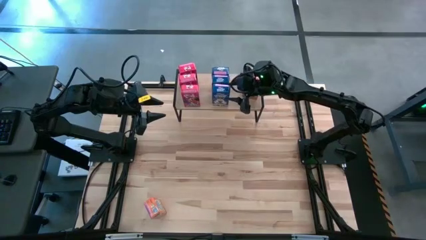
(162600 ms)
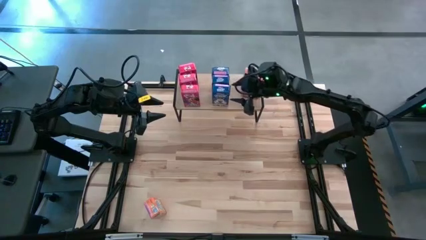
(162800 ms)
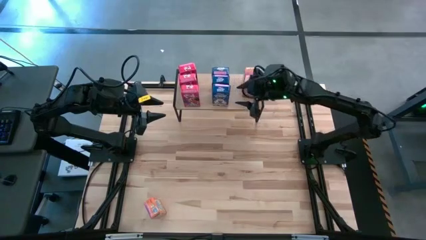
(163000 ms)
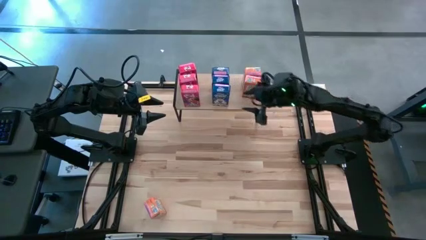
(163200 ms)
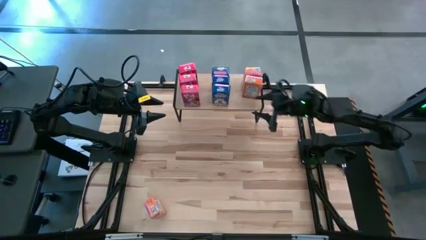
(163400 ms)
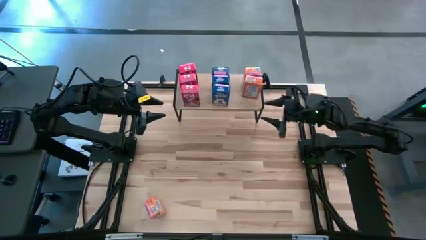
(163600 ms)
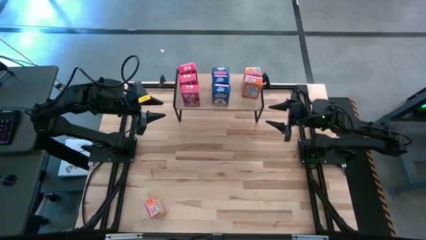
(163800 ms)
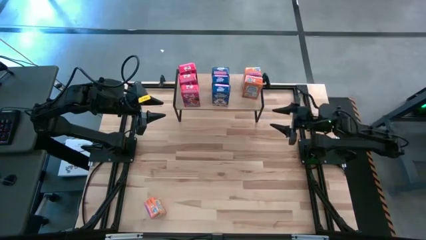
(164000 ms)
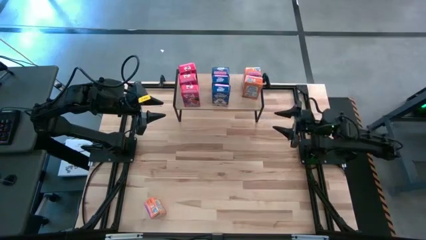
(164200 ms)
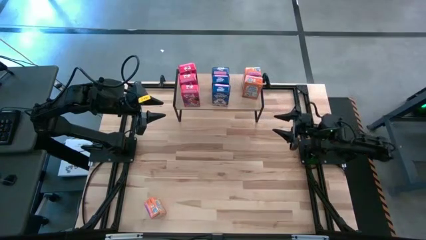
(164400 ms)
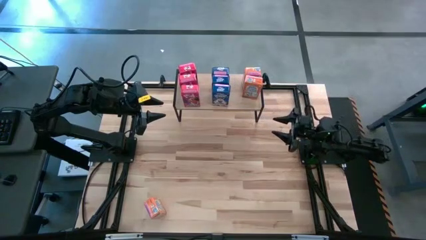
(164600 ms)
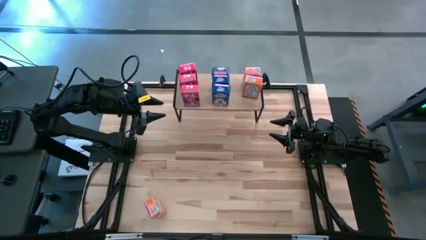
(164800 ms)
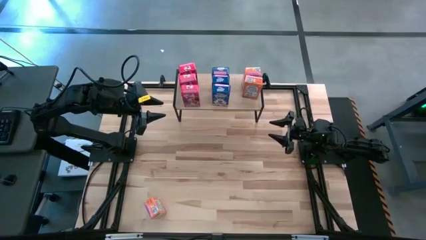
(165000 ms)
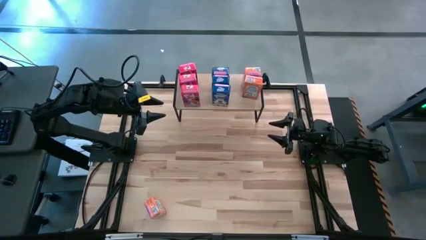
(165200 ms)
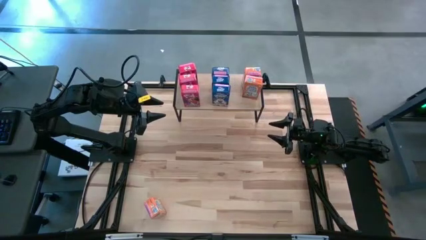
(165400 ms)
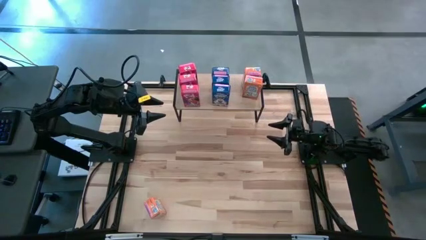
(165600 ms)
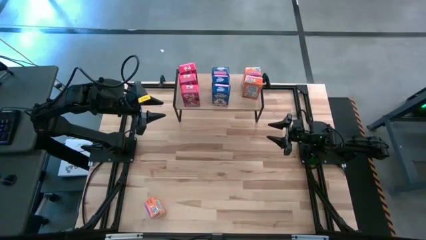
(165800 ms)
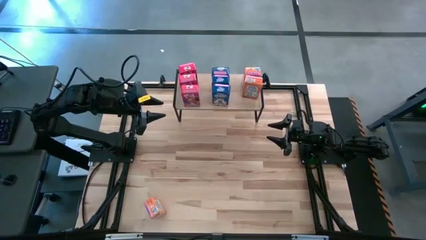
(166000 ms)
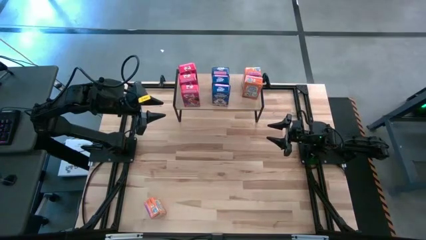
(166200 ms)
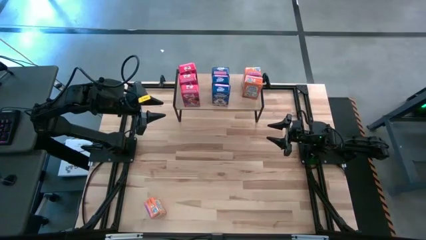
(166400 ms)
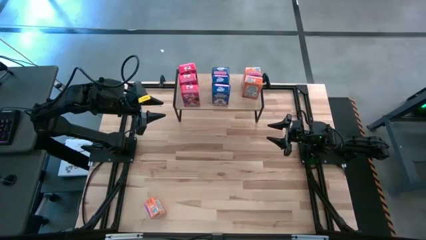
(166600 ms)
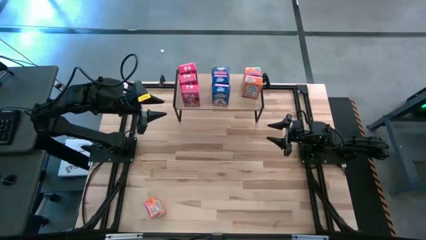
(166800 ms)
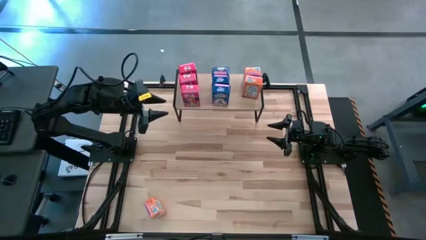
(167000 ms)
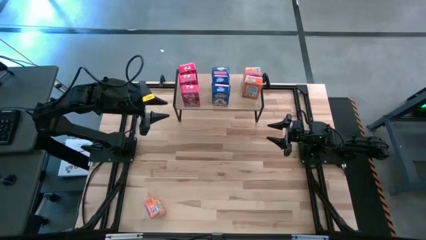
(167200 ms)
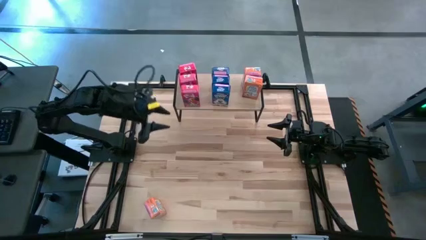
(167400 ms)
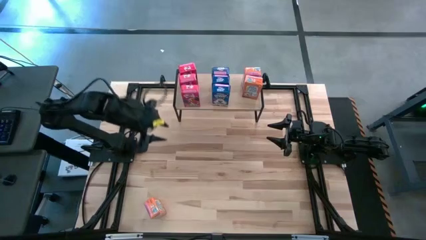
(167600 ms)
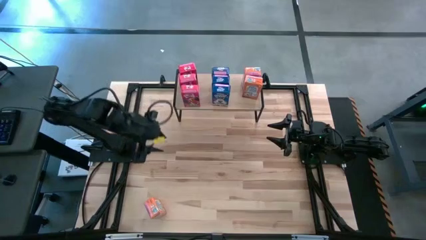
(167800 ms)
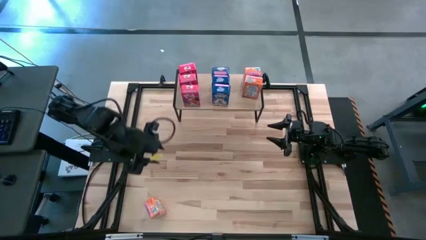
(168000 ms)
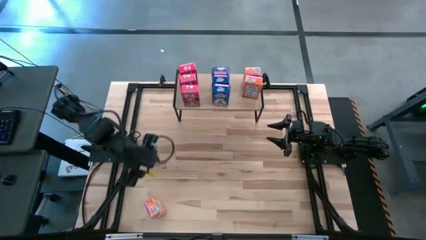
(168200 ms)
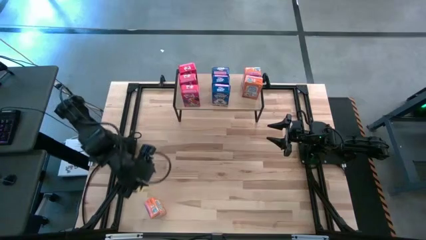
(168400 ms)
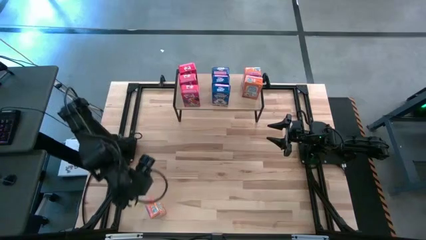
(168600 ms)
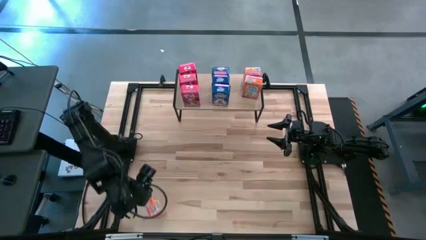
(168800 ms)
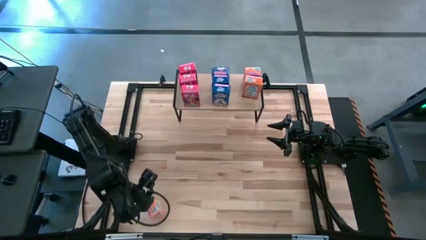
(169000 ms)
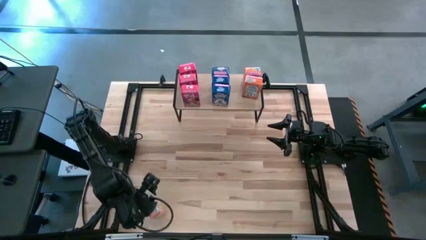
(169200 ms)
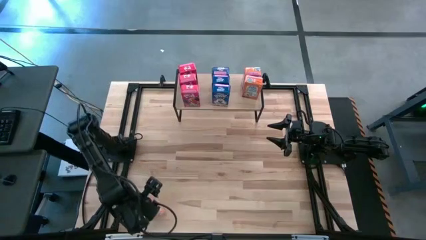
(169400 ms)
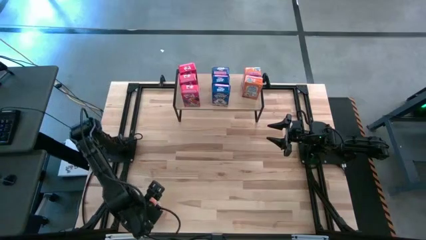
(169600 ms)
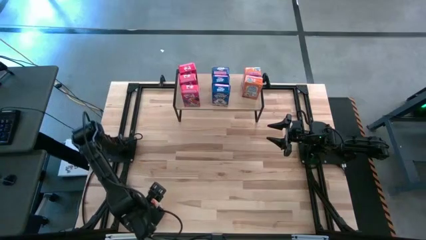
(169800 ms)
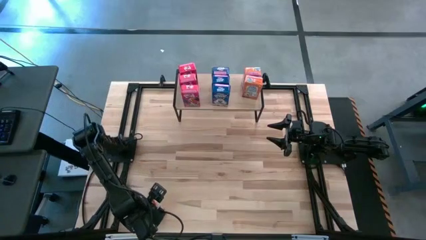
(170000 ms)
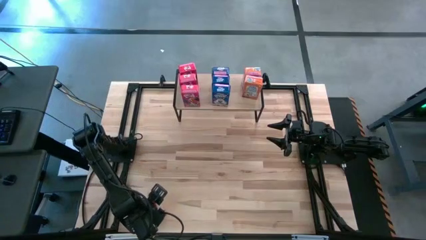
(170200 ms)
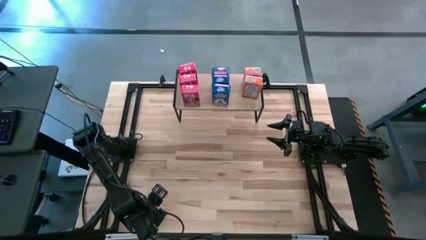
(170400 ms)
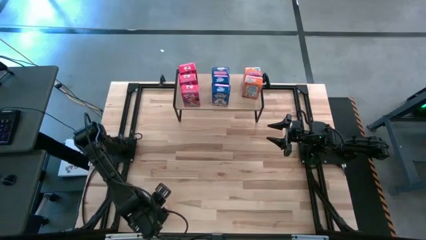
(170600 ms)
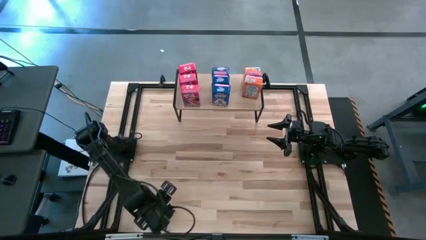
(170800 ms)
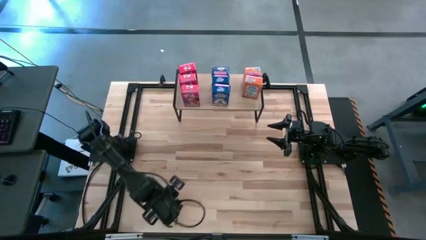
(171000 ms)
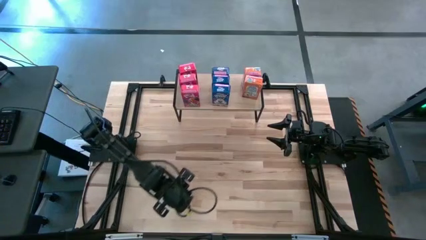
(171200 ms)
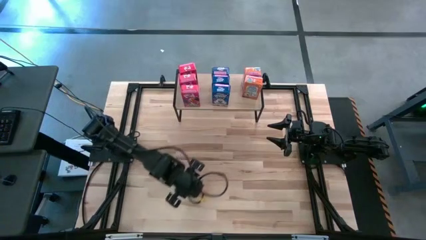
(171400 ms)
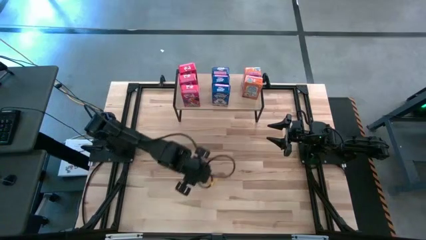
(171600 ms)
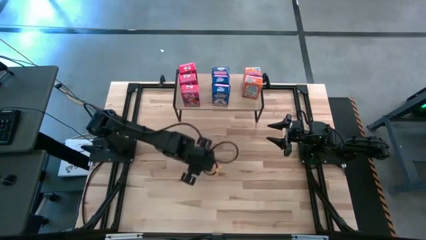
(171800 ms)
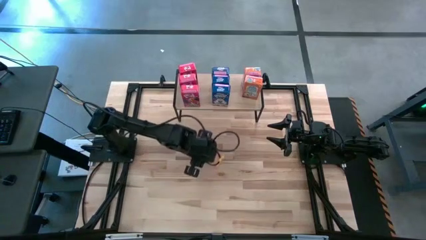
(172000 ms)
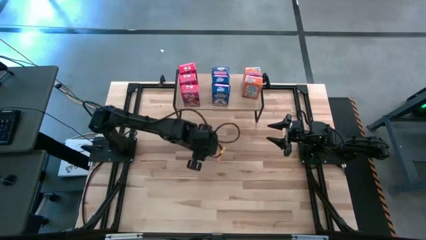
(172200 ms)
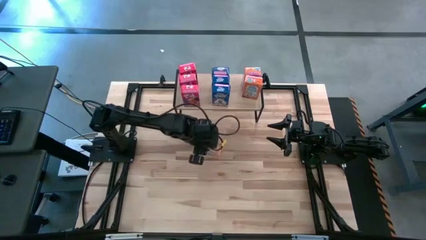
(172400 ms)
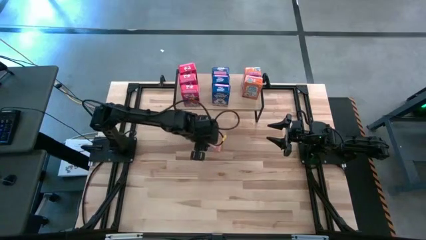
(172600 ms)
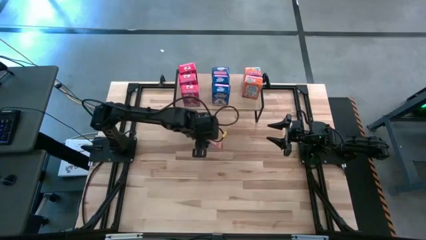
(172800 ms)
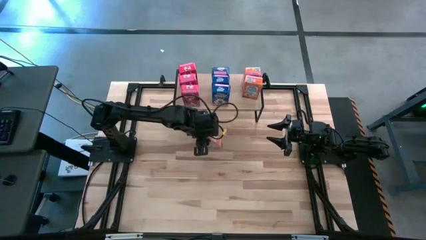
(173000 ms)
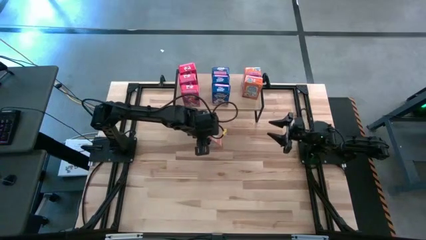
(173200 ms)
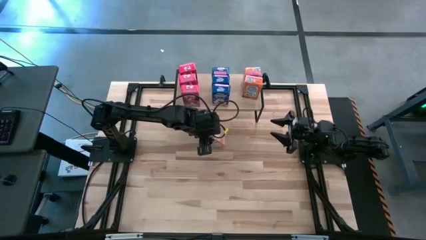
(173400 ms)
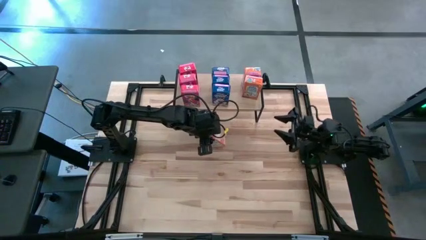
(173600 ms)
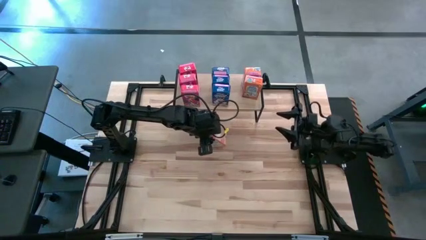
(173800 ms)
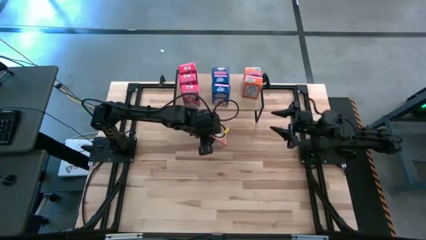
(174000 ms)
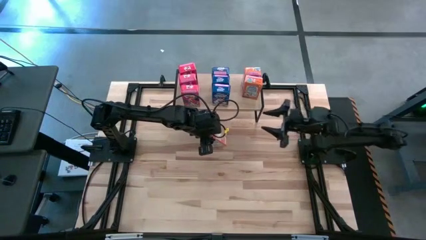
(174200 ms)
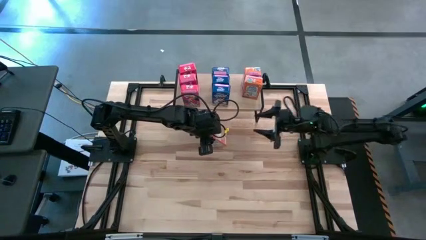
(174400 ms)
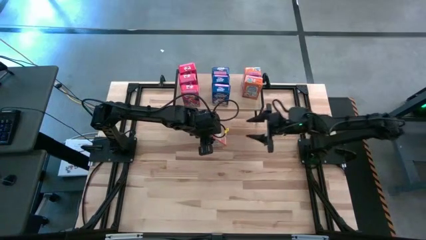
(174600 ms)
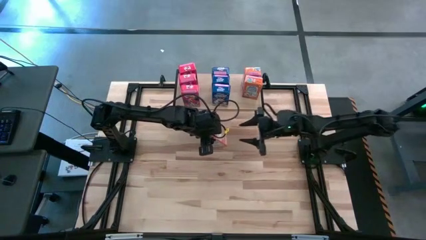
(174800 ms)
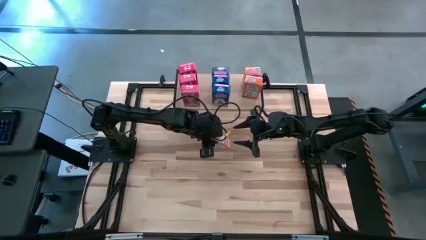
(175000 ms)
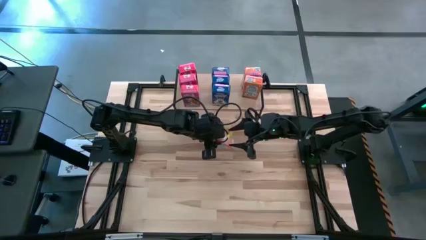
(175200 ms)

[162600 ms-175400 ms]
Task: Stack cereal on shelf
Put the orange cereal box on the shelf aligned with the other orange cereal boxes
